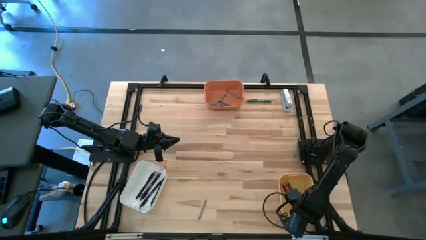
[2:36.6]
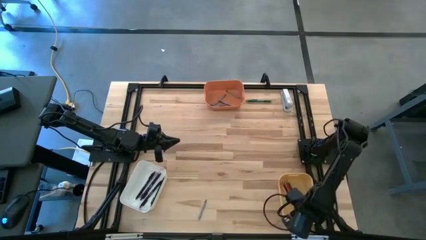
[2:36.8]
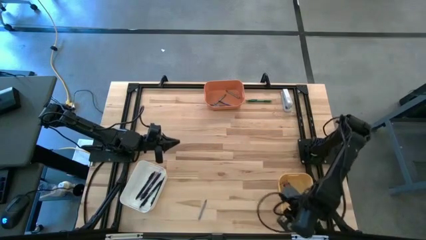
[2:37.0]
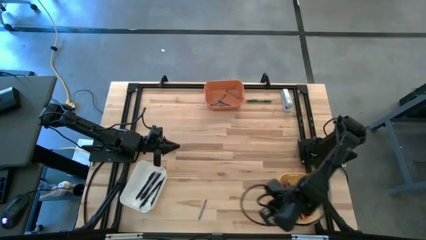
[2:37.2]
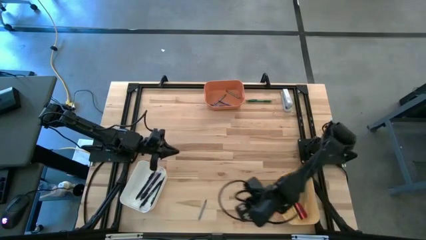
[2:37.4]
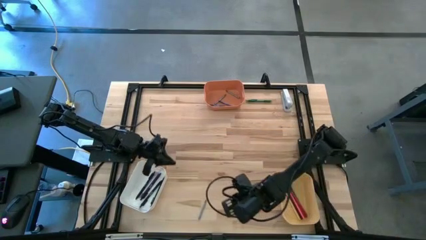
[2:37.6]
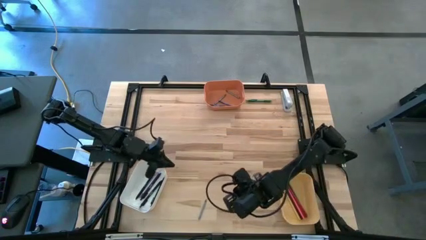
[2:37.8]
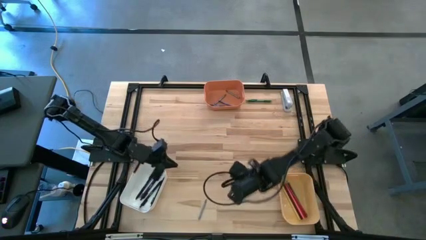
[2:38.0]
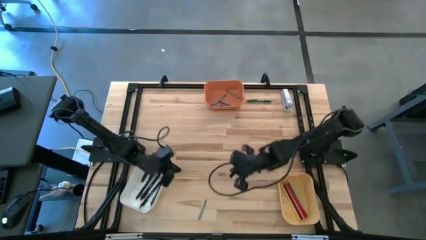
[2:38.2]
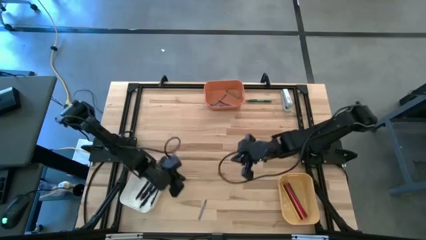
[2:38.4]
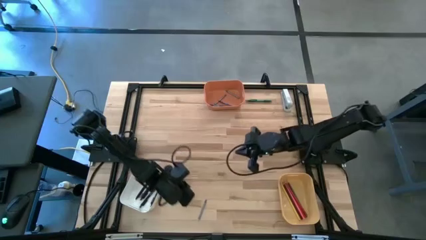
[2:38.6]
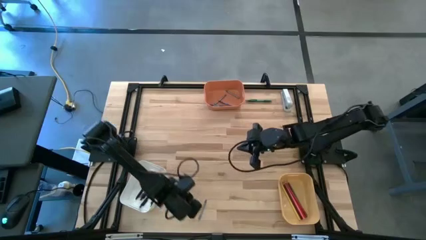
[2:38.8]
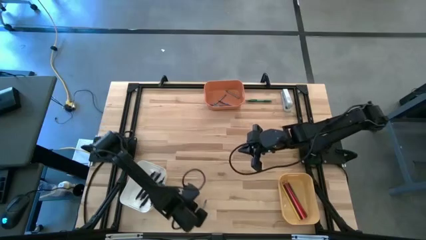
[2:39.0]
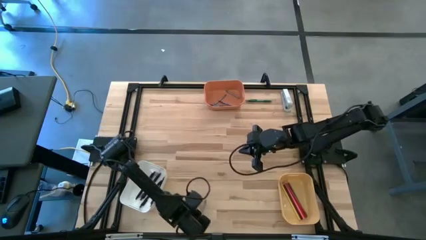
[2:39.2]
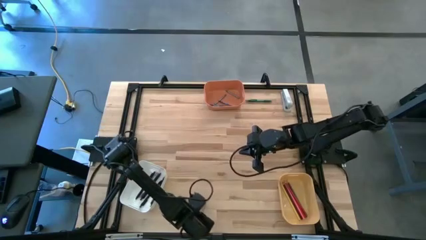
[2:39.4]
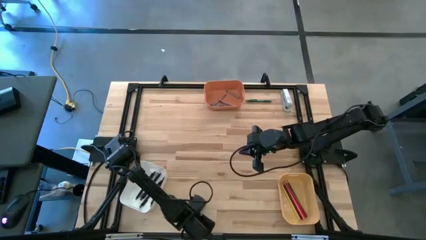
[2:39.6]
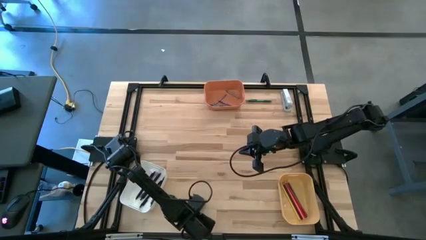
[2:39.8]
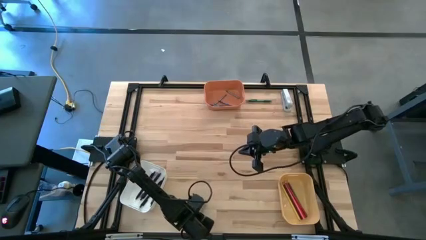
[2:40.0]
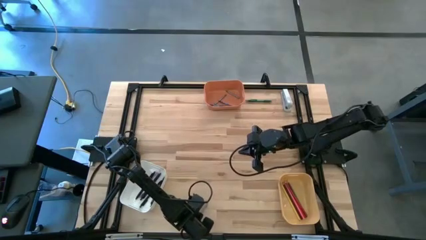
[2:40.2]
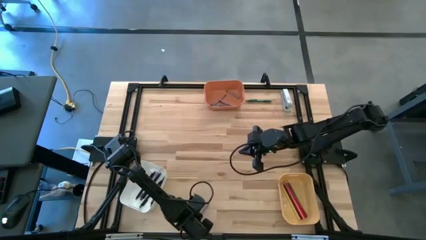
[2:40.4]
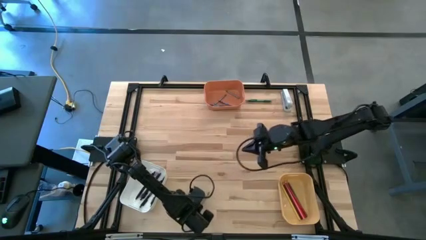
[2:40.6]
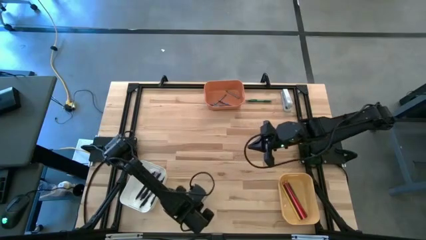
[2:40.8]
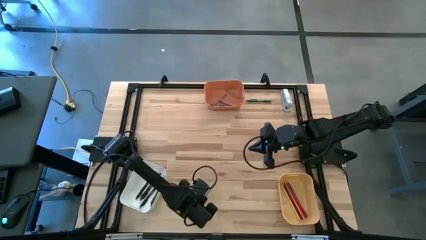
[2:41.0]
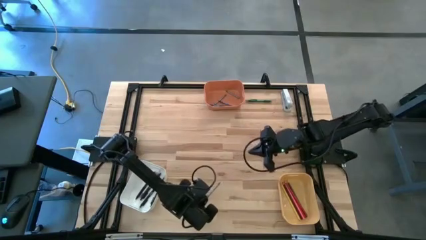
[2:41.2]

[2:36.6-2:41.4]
Task: Sort crayons/erasers/pens/pencils in bins
Put the gray crayon into the orange bin

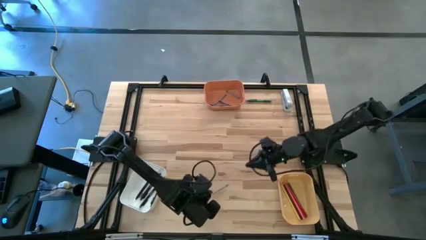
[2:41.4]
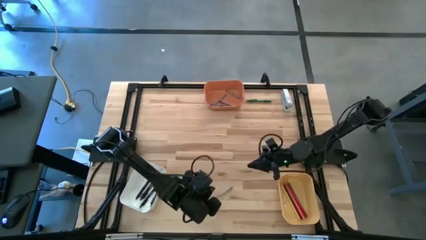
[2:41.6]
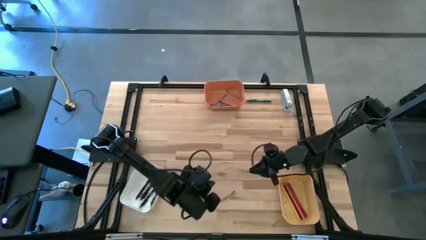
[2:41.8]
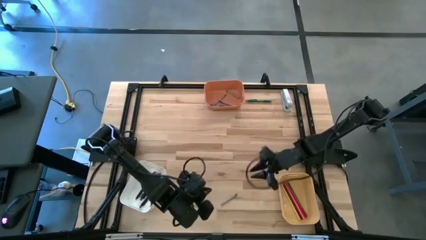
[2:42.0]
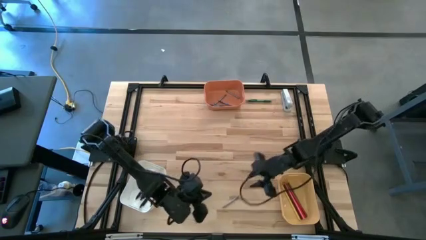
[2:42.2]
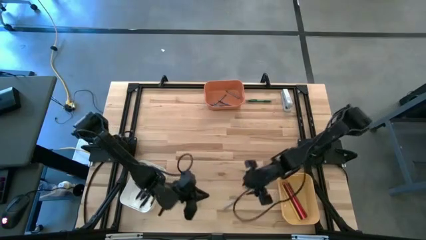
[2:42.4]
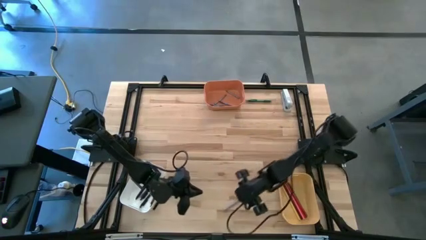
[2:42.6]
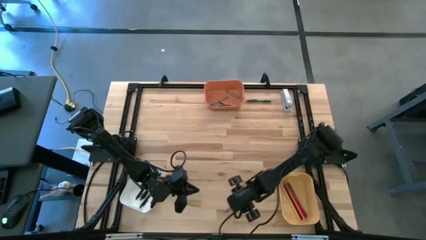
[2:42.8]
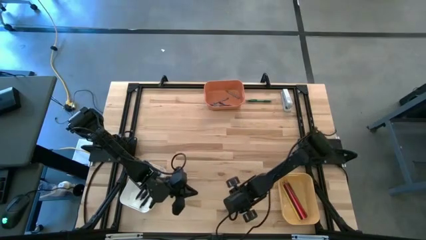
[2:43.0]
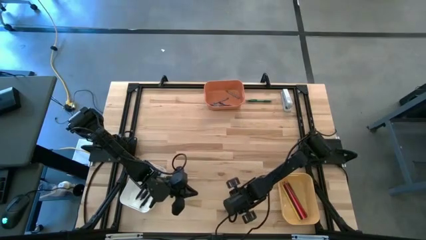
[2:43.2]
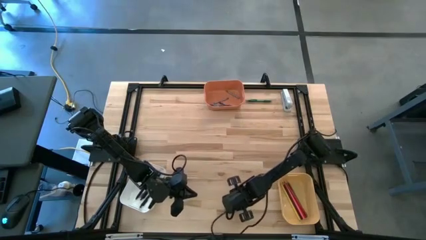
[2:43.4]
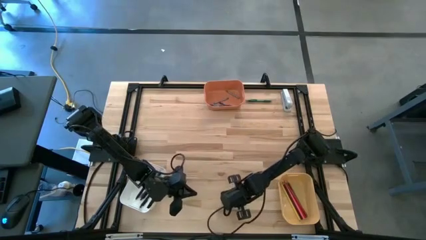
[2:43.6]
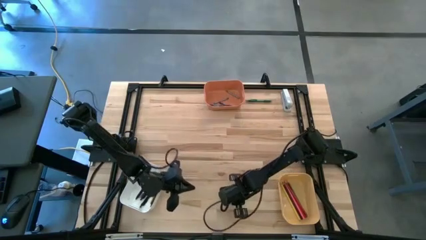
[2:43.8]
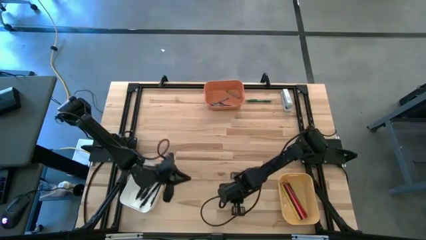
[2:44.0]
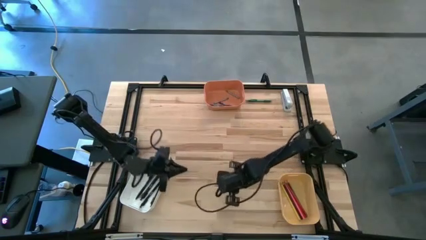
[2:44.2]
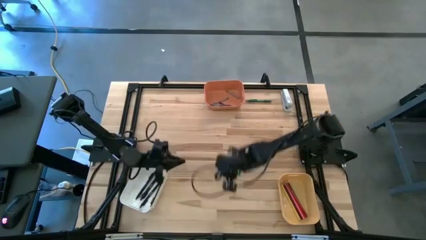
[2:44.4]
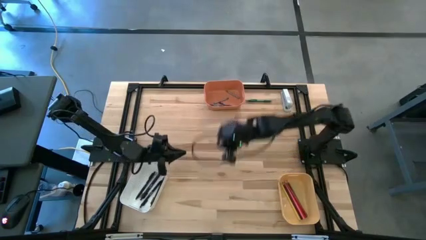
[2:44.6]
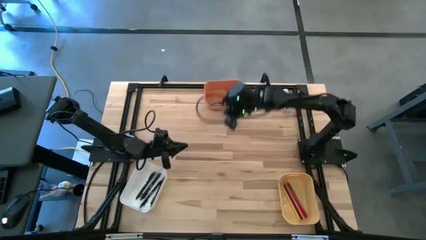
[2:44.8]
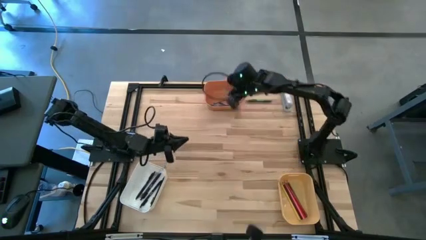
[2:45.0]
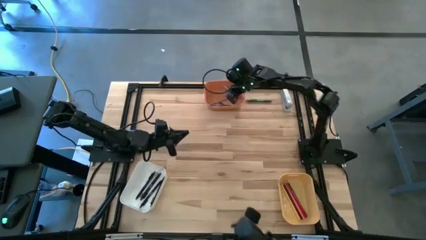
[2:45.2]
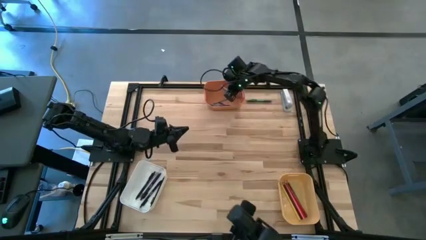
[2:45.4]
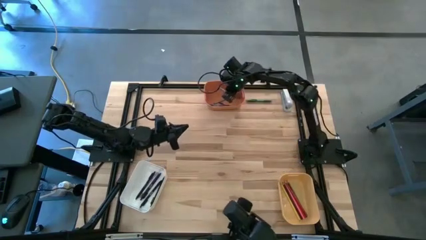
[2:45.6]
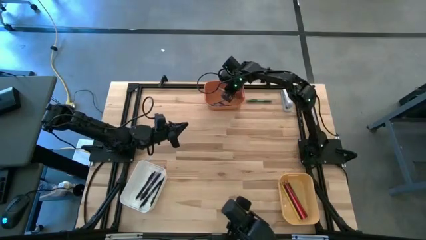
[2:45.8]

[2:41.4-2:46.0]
Put the gray crayon into the orange bin

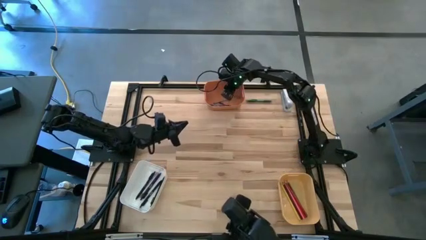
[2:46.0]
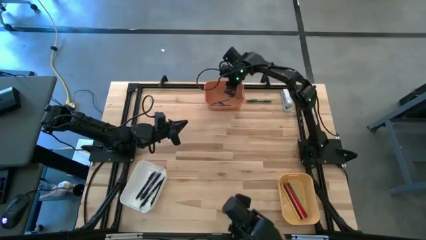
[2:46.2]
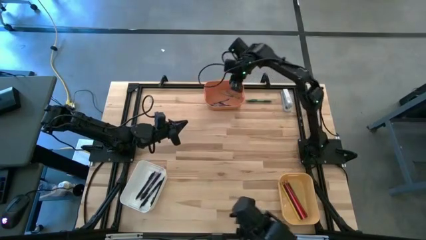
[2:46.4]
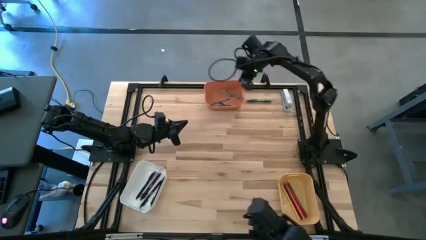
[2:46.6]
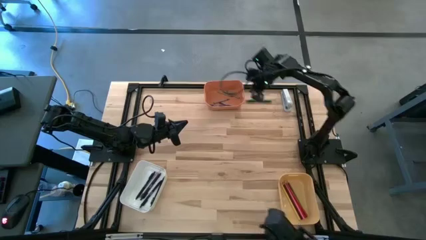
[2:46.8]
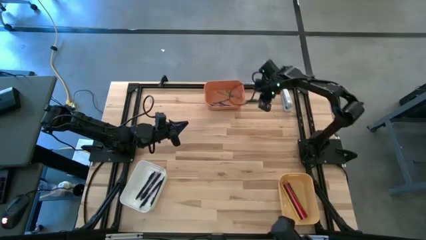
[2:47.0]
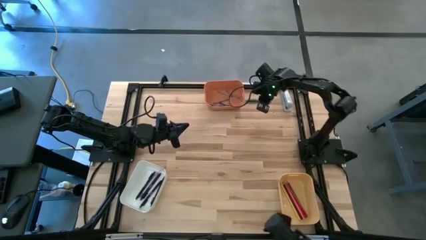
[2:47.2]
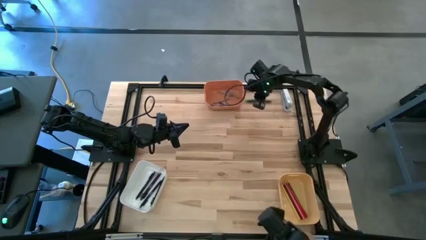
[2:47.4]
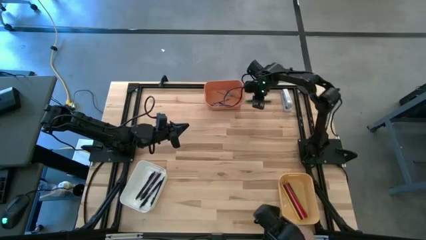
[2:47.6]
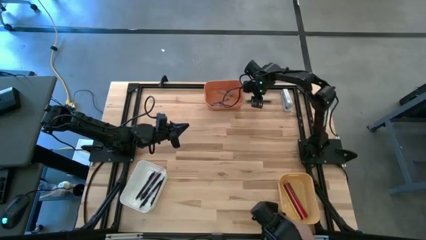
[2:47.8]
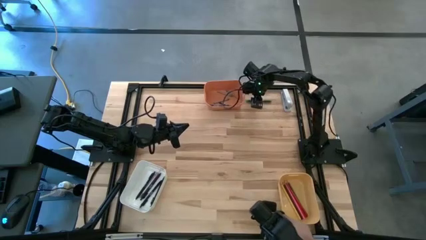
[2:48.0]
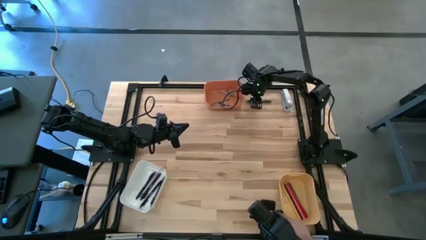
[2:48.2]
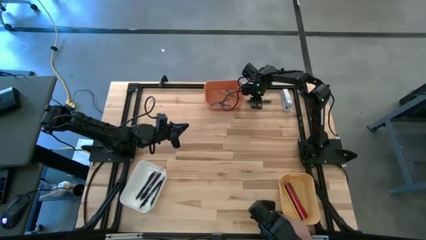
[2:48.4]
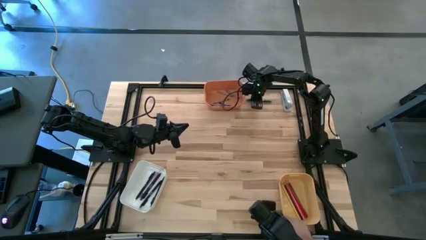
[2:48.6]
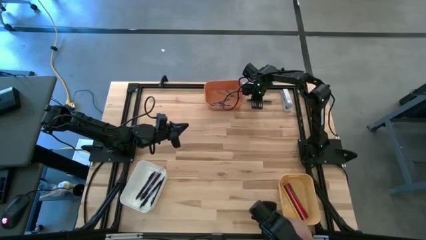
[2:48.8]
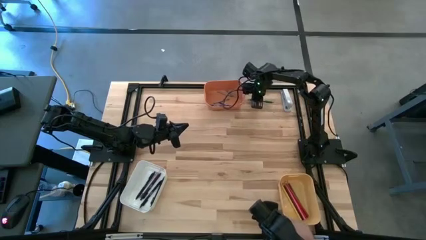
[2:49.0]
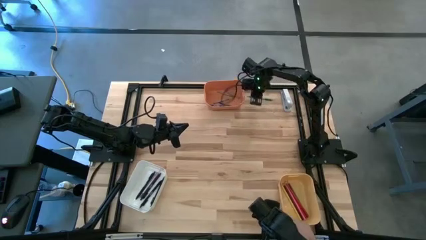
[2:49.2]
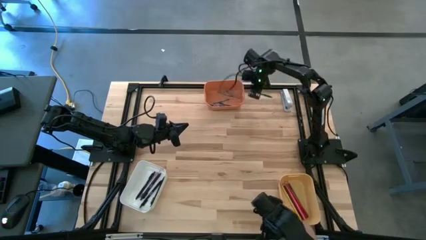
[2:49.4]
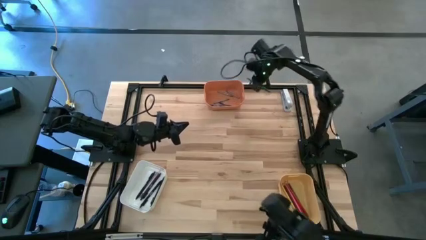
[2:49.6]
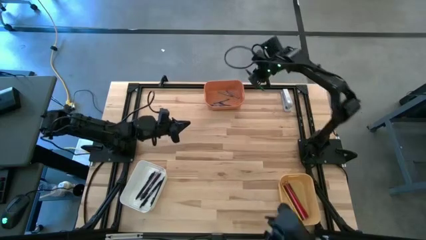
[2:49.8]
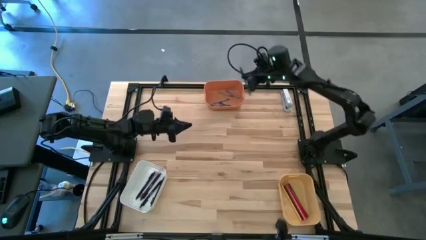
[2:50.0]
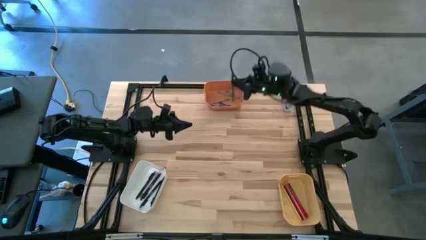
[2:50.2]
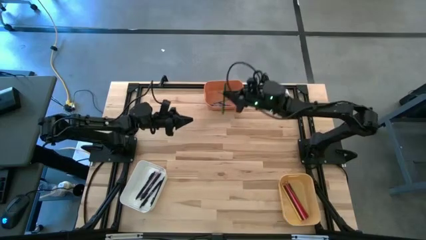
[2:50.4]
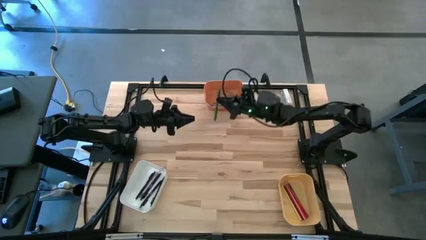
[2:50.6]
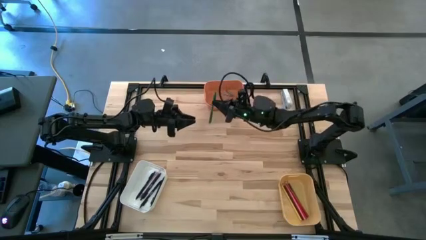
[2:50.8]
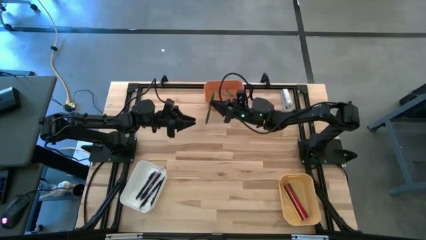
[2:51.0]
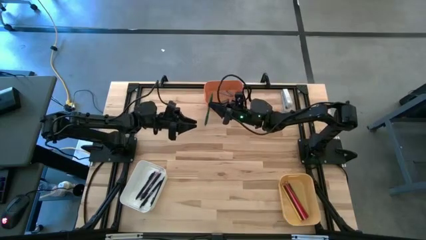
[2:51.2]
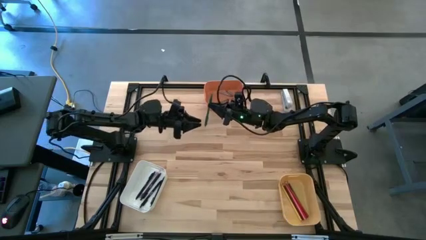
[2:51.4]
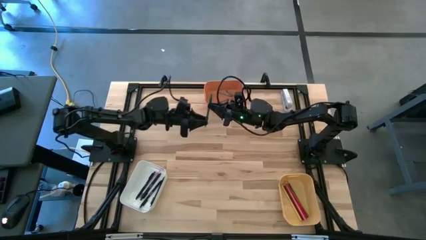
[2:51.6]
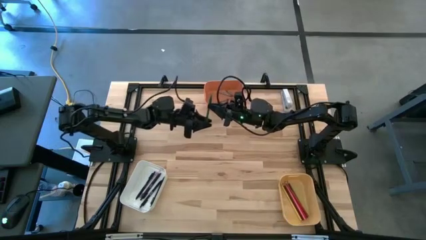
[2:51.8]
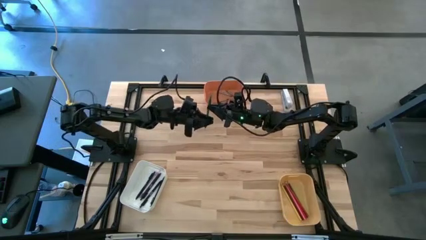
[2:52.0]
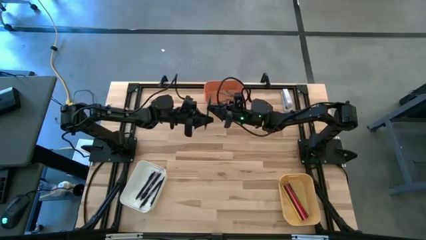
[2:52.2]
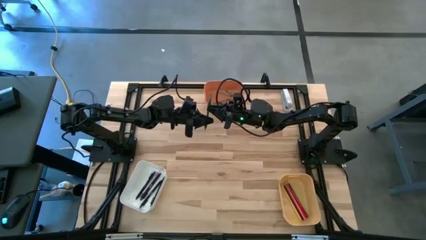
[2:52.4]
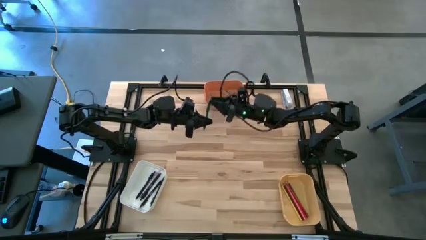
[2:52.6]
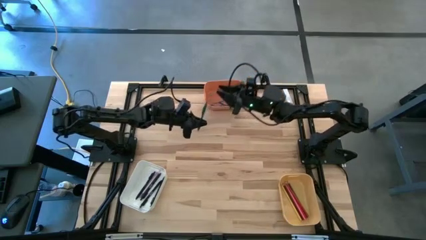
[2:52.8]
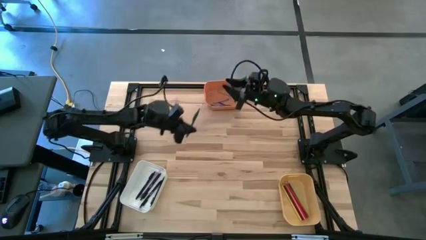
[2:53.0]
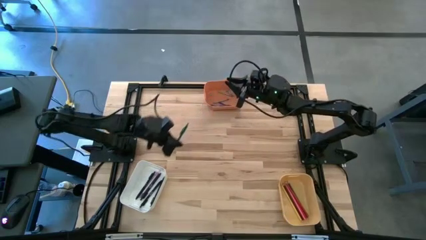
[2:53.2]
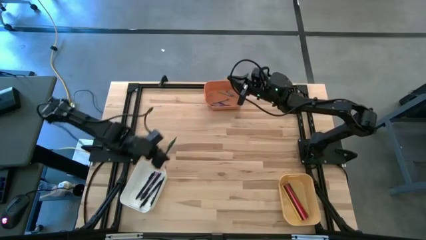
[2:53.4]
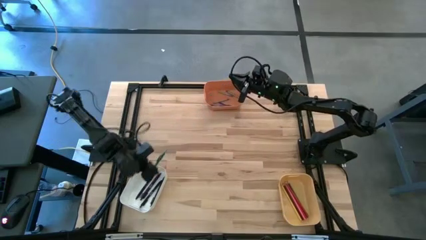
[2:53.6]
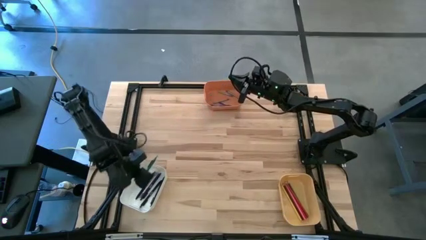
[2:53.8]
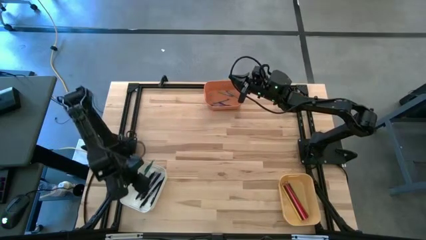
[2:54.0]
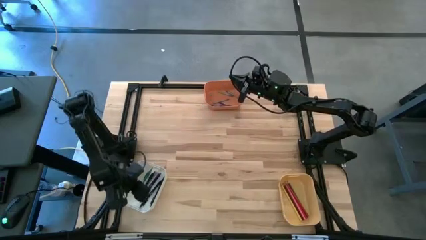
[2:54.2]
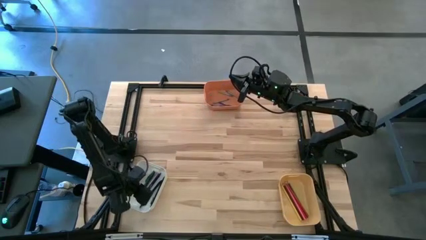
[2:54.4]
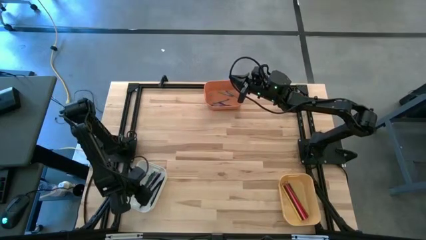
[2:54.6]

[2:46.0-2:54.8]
Put the green pen into the white bin
